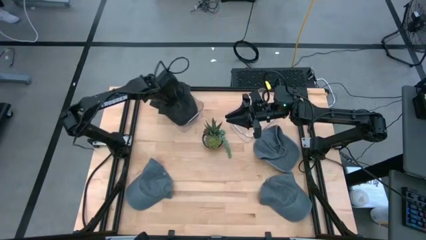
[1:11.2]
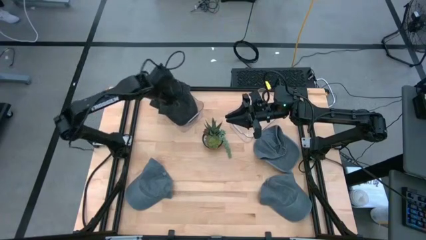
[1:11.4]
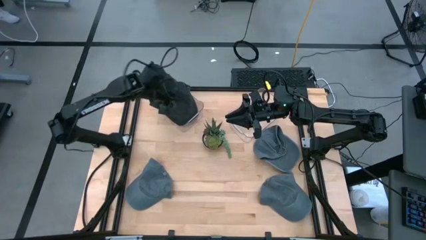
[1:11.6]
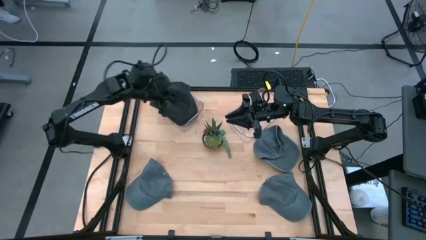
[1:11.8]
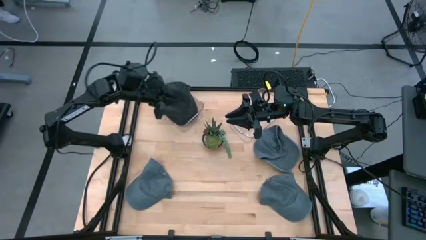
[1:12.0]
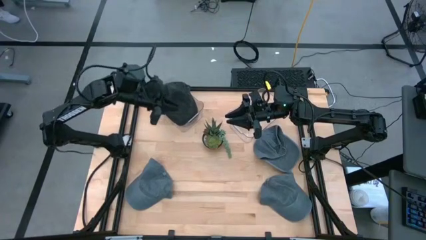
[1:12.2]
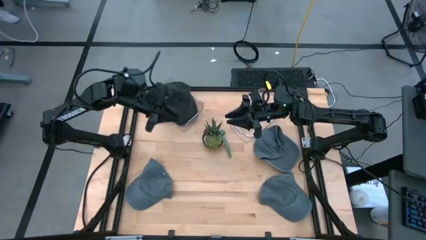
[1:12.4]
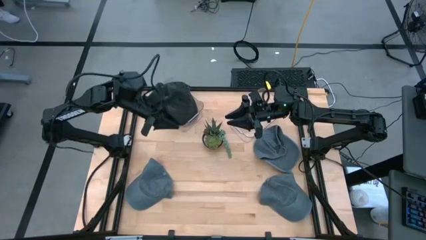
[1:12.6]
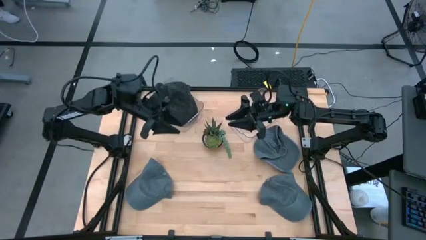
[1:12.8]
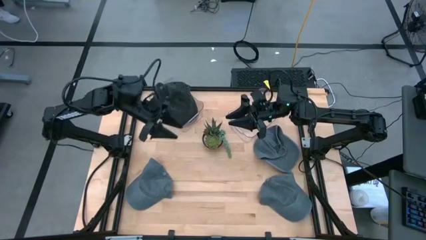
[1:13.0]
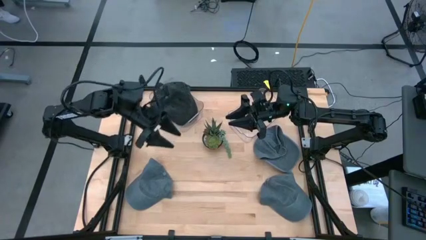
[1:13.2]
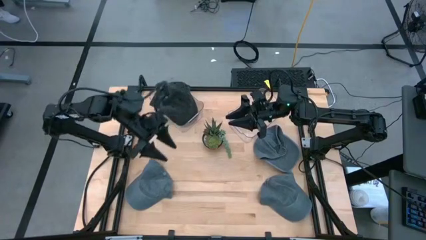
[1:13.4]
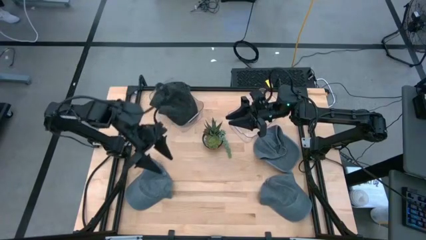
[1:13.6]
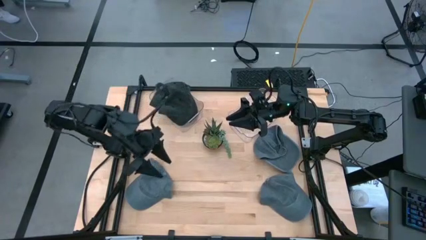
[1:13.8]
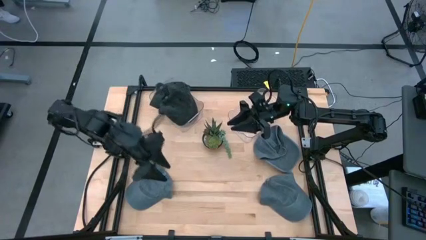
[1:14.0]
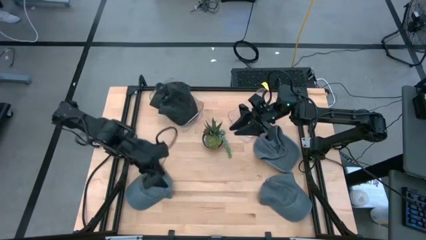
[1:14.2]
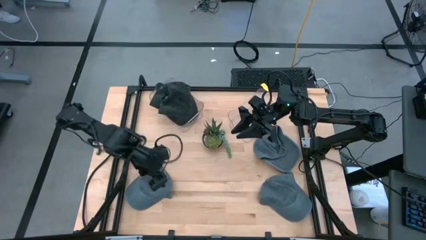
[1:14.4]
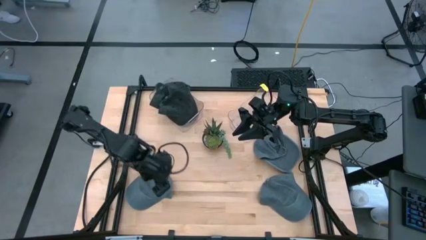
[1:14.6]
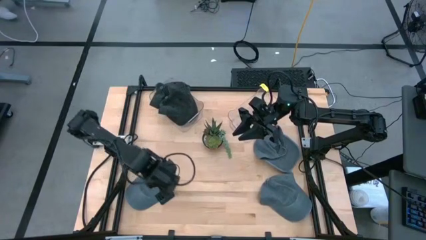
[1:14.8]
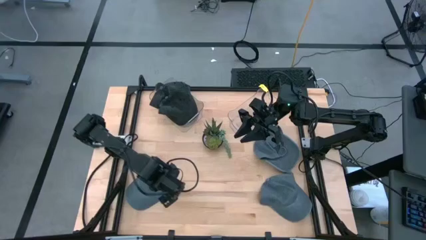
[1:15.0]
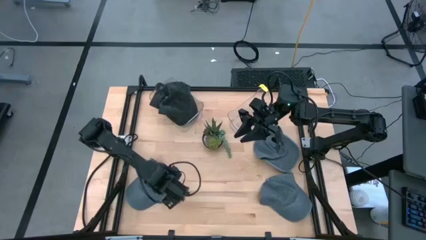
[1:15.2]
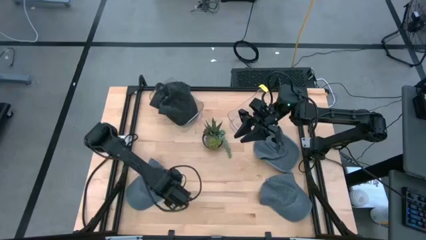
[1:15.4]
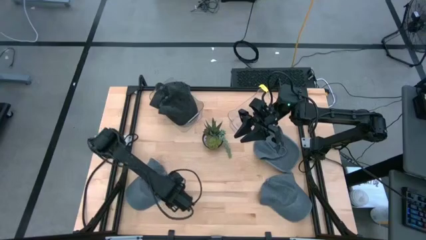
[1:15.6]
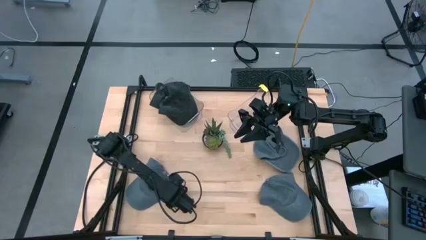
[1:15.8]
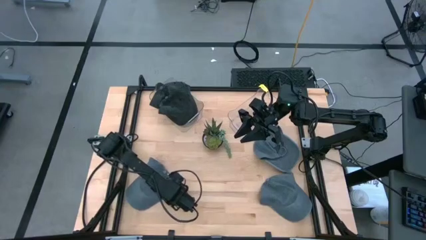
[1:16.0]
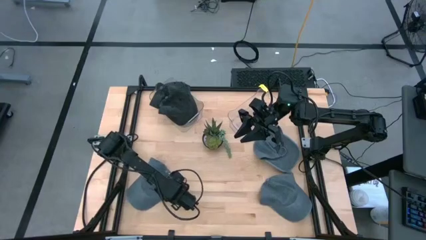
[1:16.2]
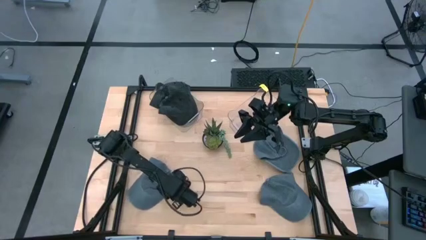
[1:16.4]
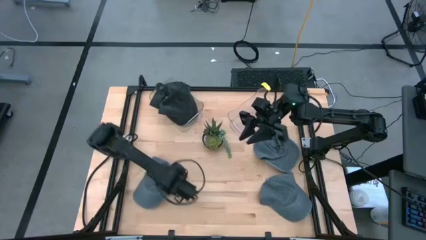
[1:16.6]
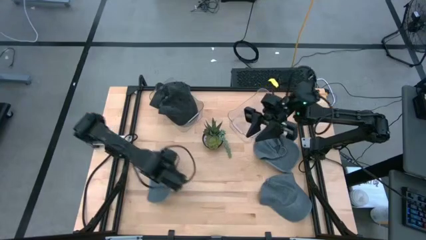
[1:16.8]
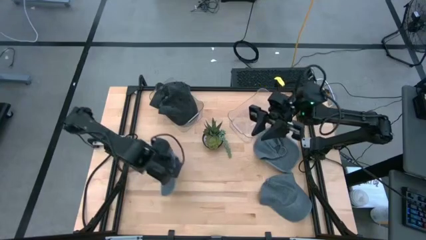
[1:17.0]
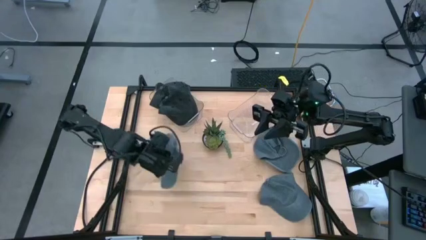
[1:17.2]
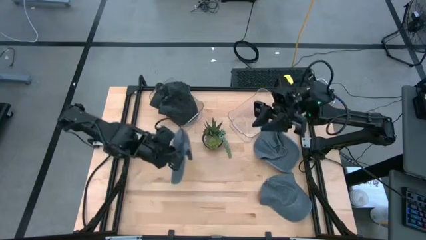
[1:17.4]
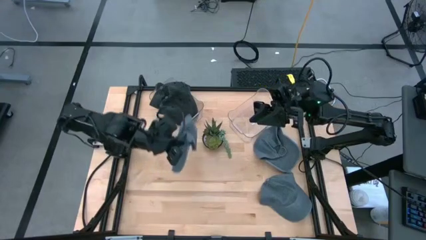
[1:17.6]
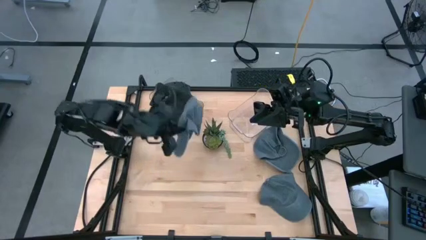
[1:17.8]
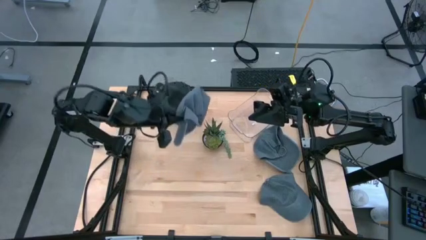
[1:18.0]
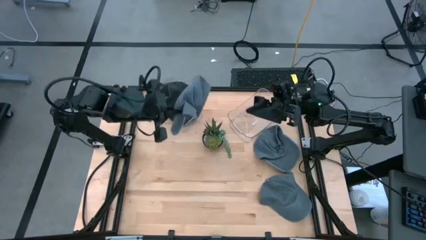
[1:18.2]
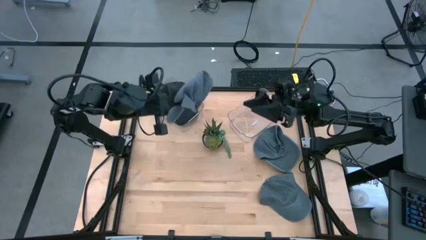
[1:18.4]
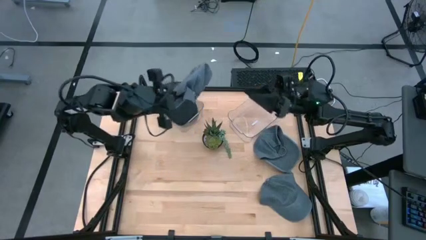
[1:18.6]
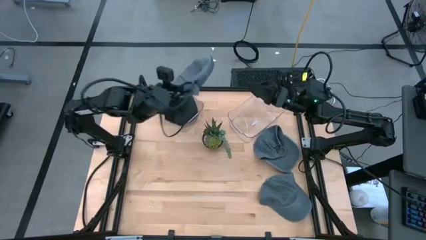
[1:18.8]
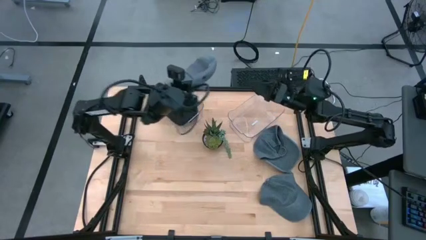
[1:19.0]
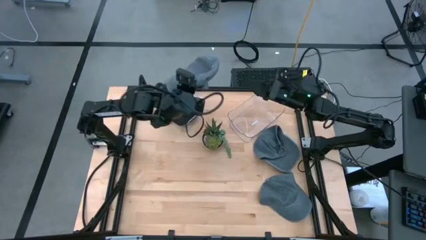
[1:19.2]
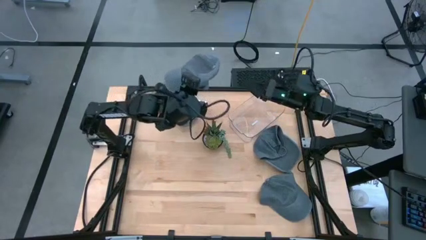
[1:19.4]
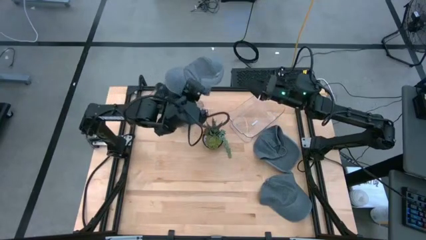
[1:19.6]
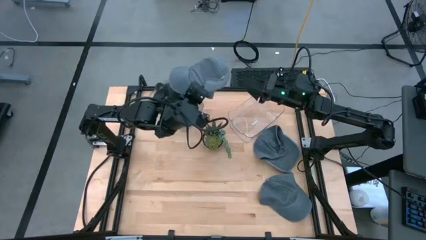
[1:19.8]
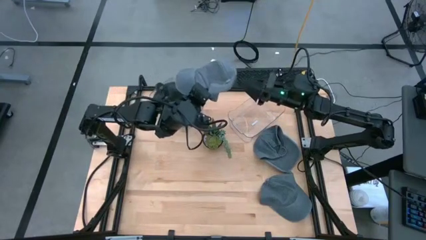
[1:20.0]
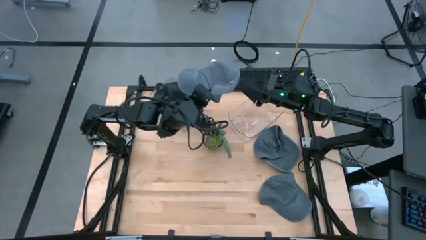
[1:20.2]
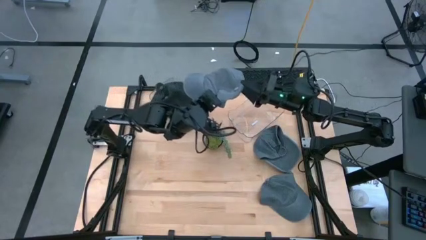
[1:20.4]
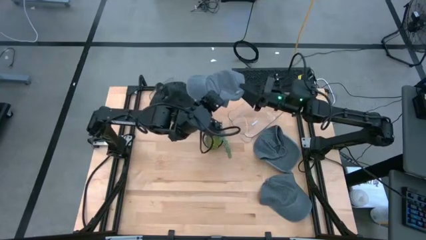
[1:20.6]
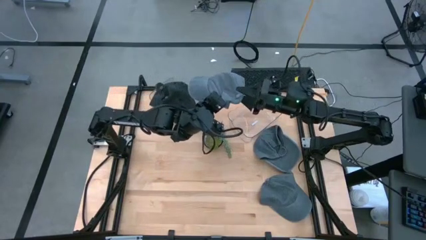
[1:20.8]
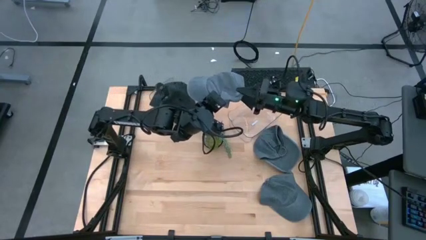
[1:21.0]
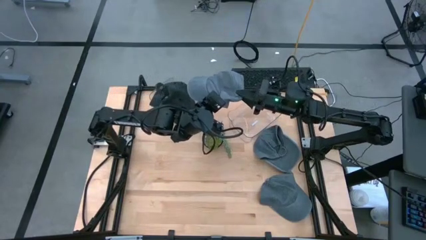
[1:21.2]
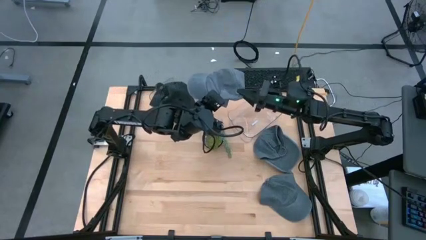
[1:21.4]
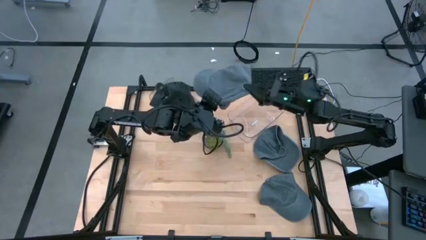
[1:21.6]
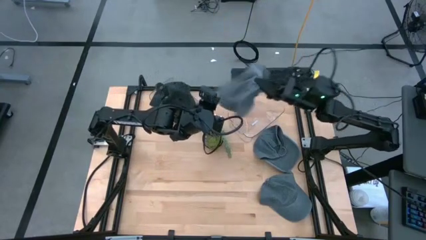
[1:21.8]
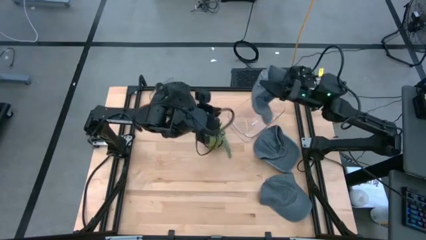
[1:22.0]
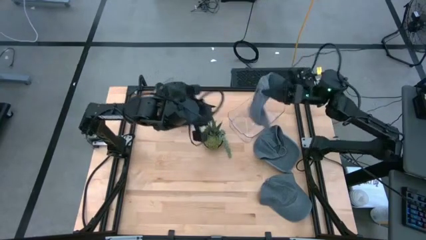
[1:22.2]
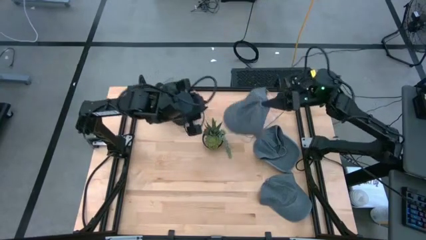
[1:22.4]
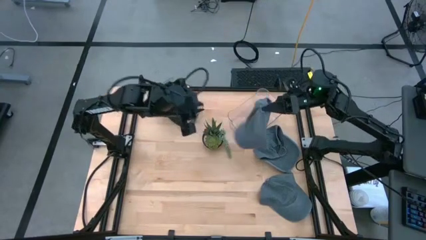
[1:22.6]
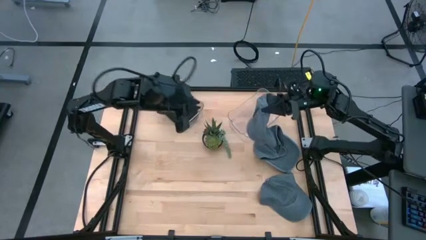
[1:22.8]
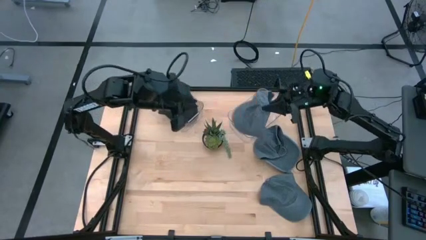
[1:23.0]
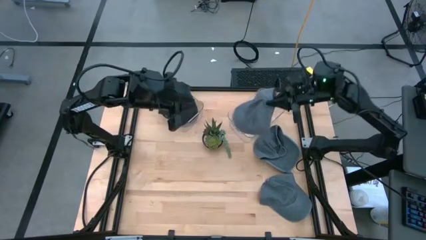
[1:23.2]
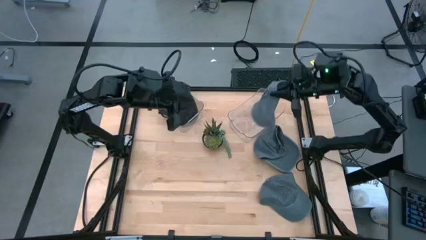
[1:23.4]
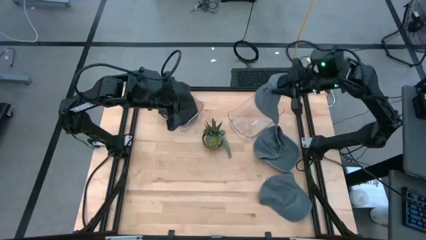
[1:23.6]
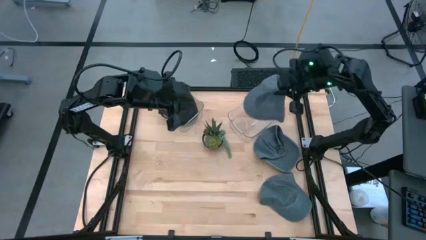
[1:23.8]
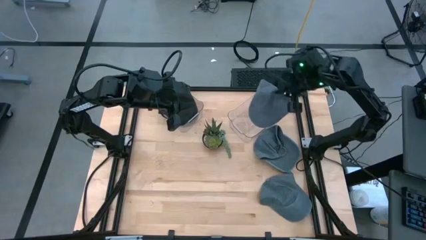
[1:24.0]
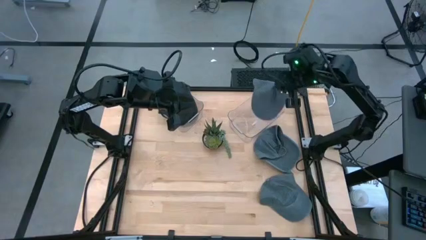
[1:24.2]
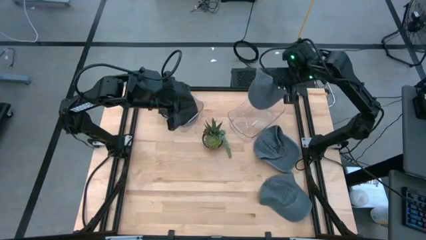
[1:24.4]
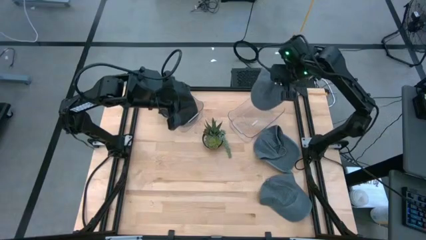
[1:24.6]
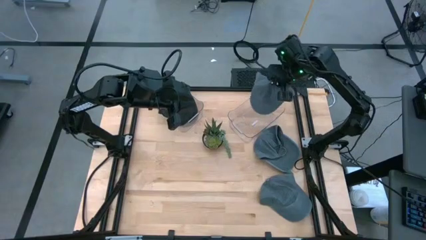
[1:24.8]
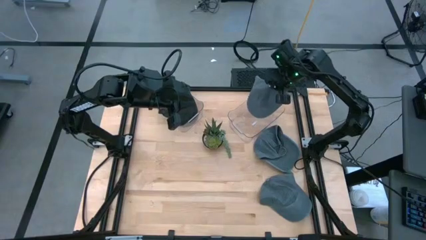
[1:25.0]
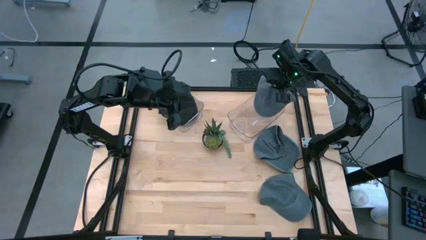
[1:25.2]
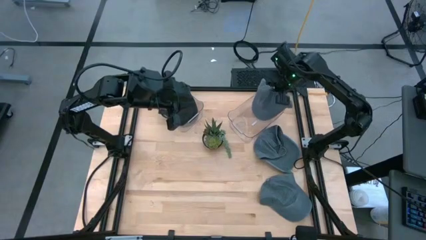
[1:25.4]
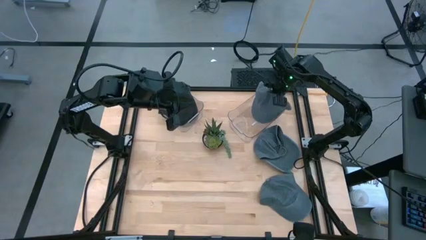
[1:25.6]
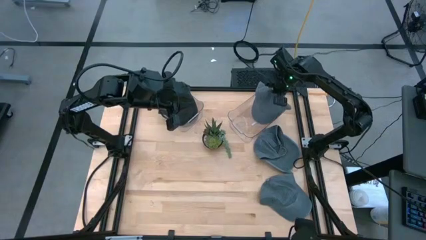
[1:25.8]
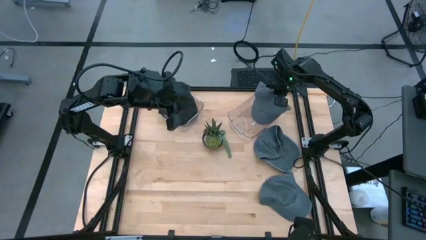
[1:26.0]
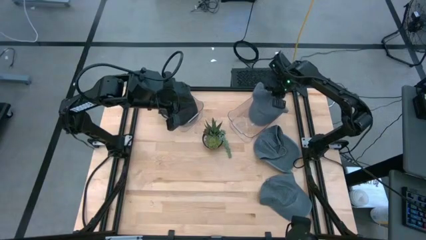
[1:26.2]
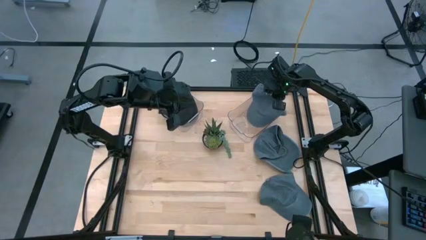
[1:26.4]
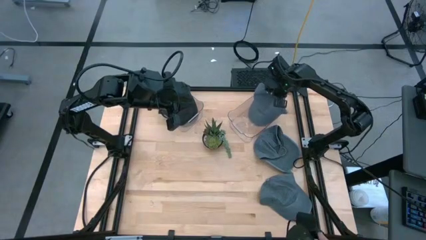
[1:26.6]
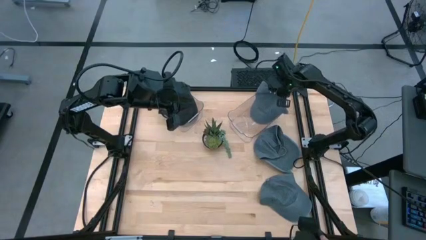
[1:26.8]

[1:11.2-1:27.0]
Task: Pick & Place hat
Put the bottom left blue cap into the right transparent bin

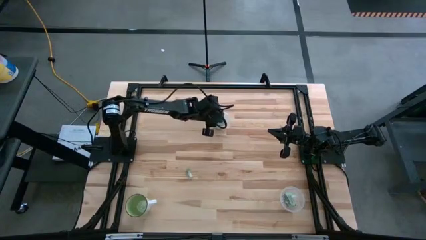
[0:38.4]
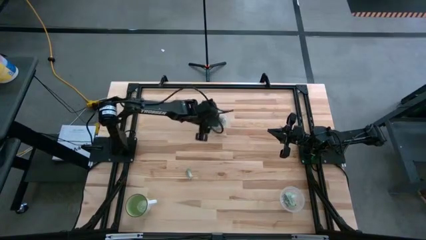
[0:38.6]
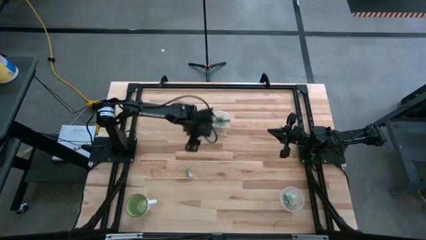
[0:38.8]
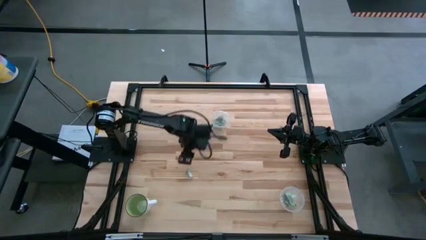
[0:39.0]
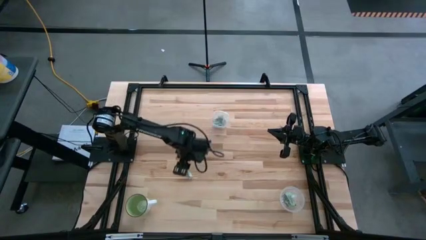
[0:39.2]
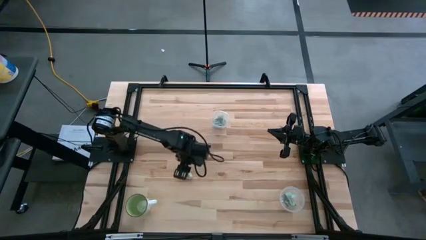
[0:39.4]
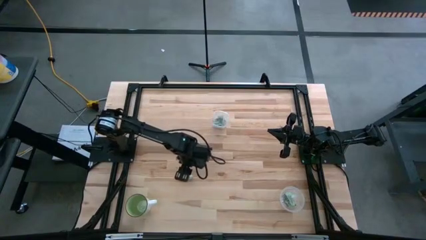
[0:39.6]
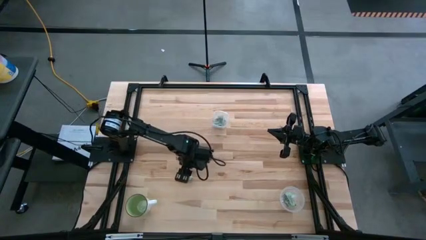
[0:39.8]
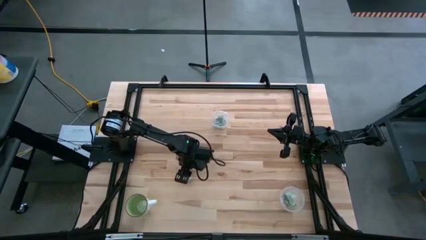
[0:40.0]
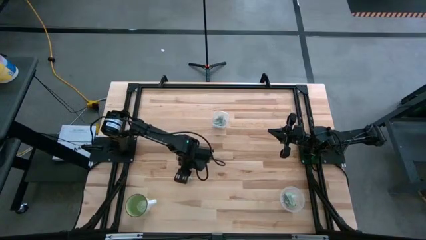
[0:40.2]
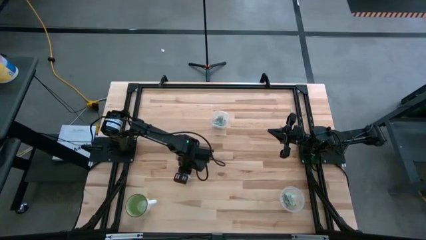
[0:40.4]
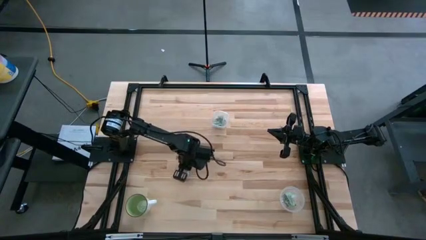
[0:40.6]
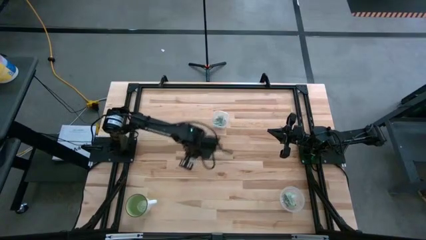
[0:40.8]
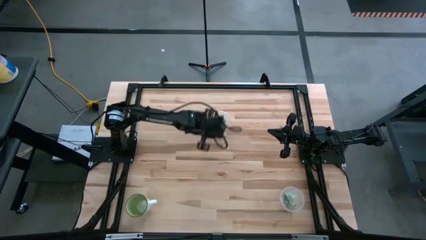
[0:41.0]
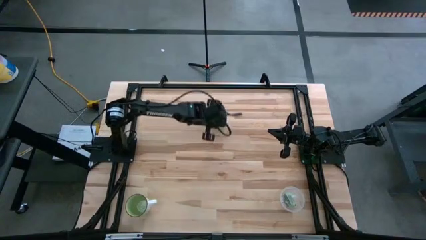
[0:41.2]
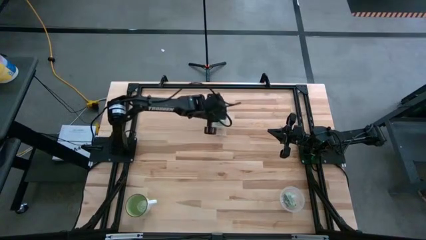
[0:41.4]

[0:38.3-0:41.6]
Task: Pick and place items into bin
Put the green stevia packet into the square transparent bin
